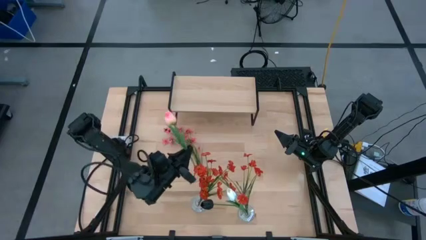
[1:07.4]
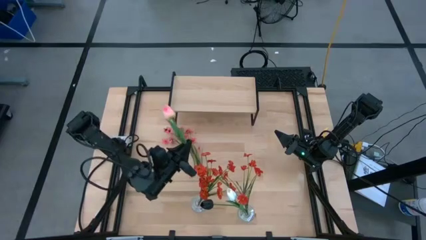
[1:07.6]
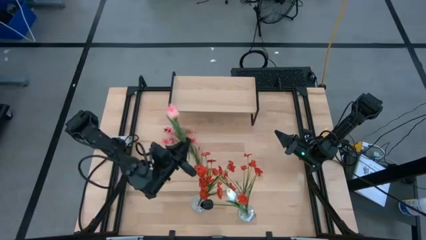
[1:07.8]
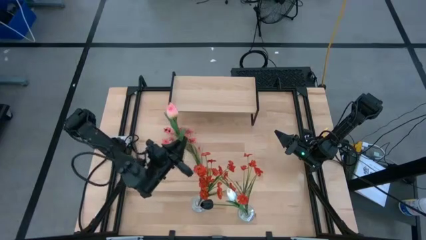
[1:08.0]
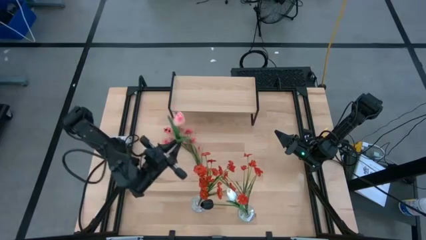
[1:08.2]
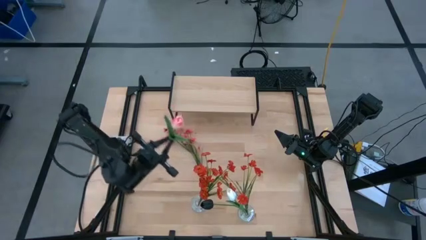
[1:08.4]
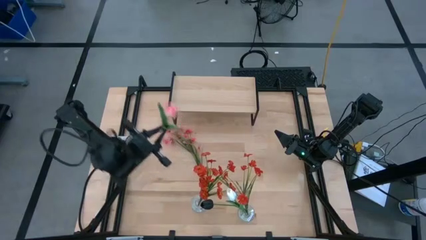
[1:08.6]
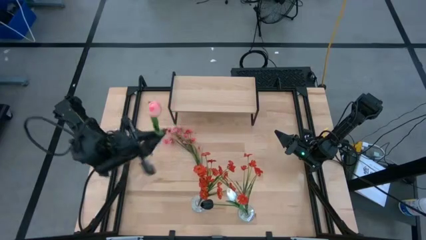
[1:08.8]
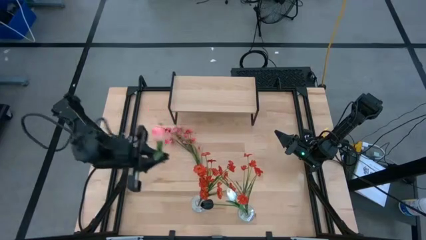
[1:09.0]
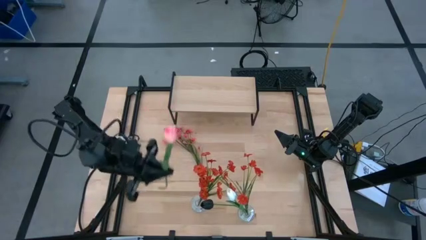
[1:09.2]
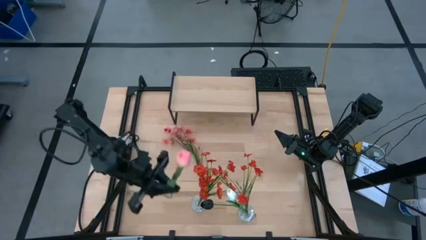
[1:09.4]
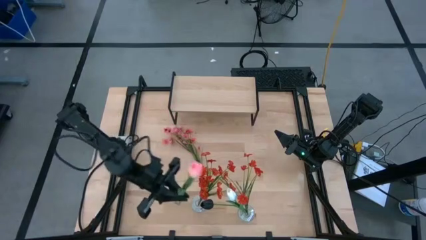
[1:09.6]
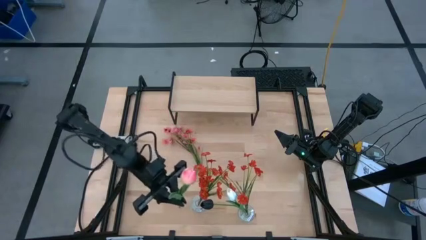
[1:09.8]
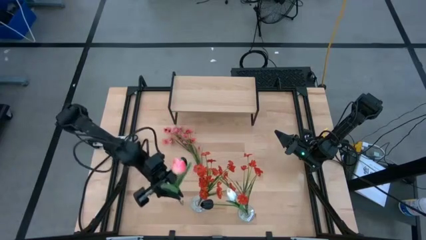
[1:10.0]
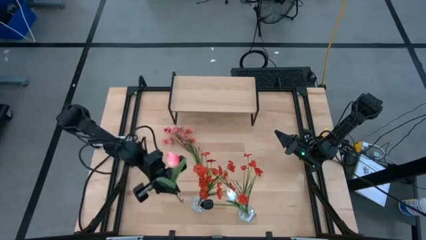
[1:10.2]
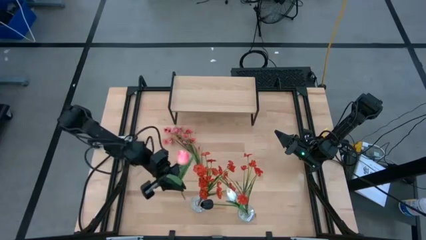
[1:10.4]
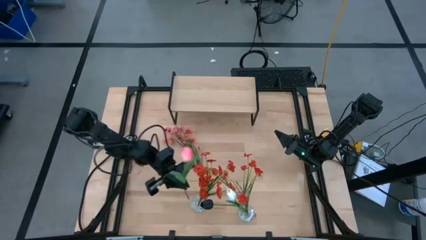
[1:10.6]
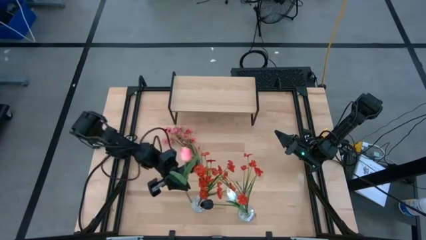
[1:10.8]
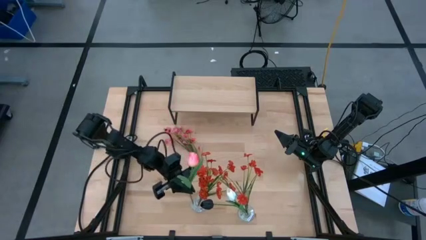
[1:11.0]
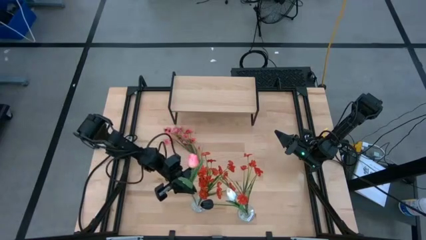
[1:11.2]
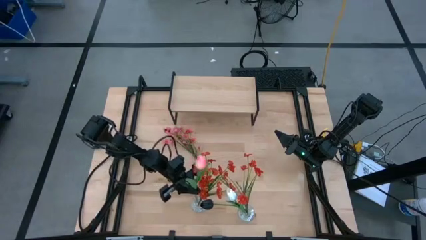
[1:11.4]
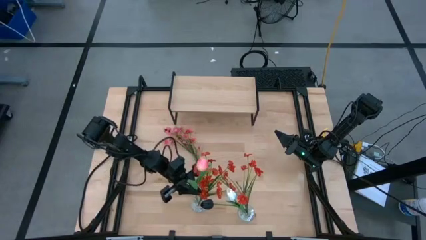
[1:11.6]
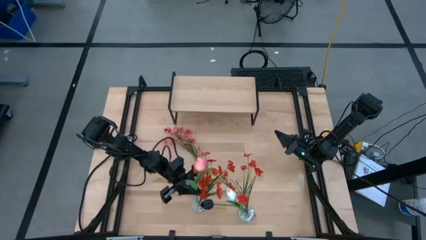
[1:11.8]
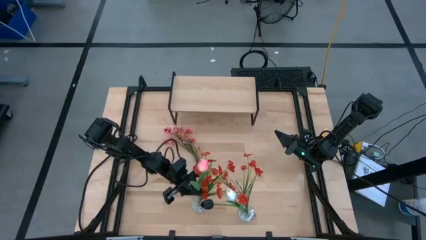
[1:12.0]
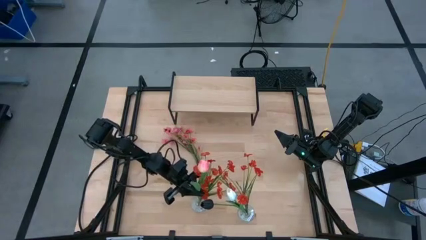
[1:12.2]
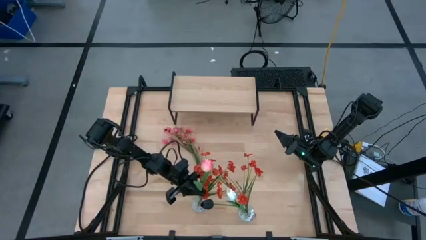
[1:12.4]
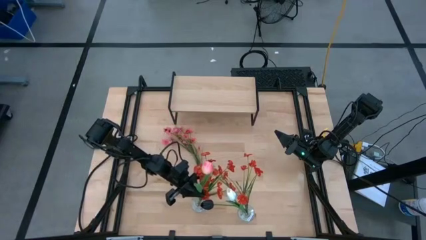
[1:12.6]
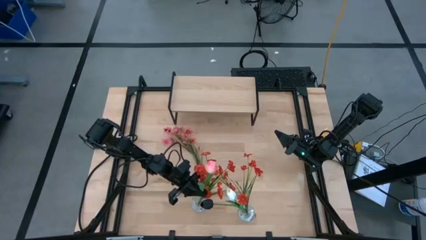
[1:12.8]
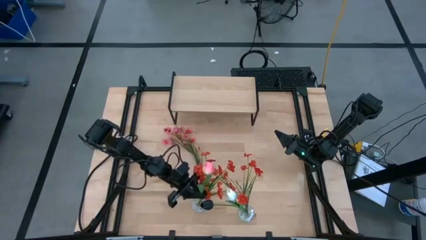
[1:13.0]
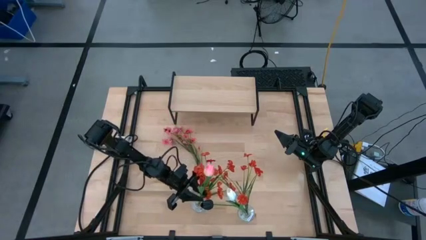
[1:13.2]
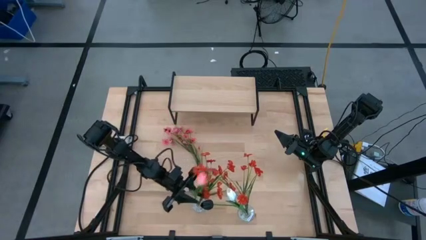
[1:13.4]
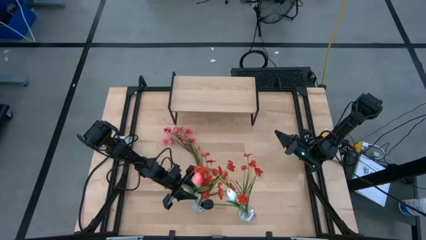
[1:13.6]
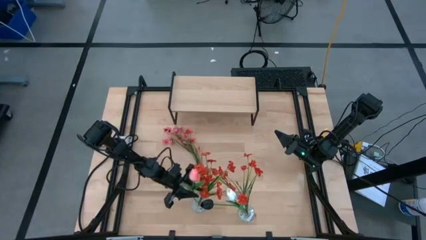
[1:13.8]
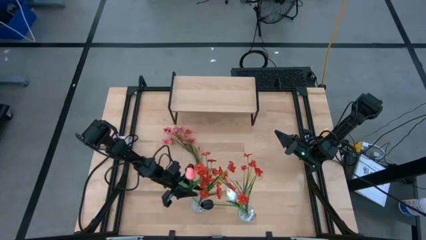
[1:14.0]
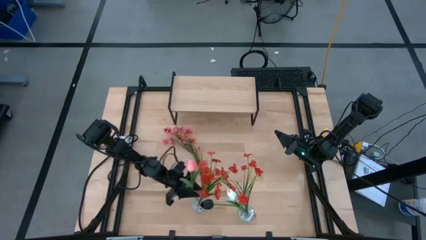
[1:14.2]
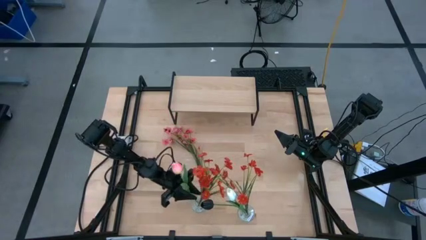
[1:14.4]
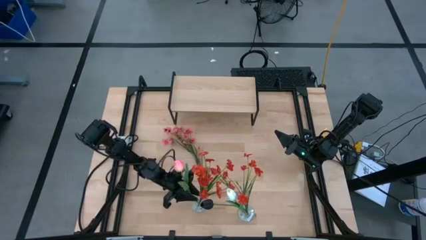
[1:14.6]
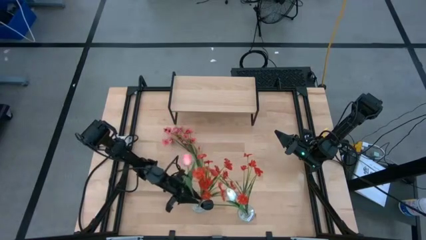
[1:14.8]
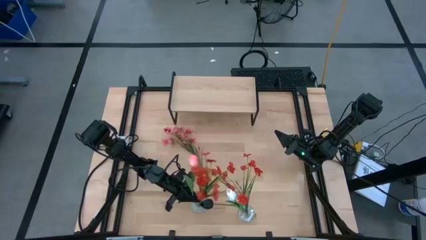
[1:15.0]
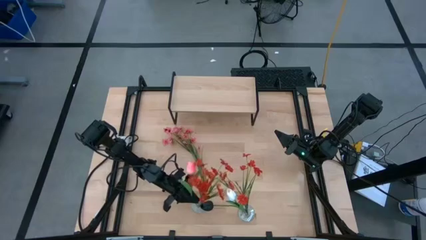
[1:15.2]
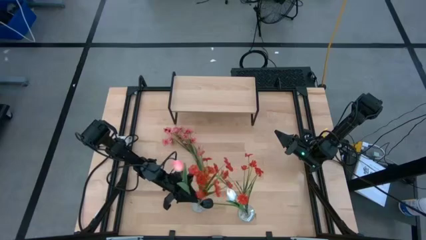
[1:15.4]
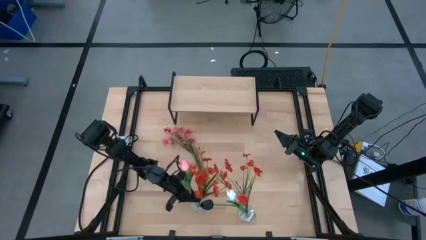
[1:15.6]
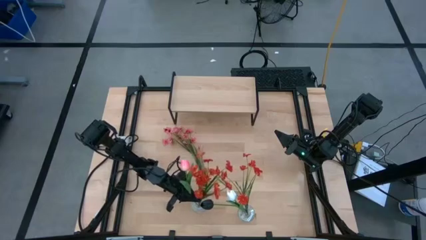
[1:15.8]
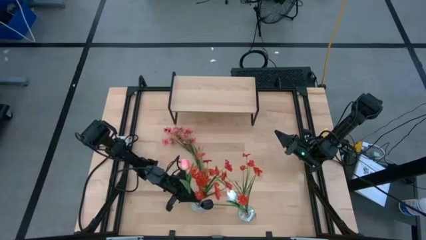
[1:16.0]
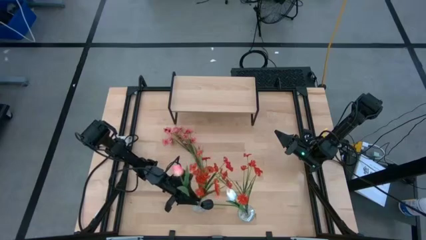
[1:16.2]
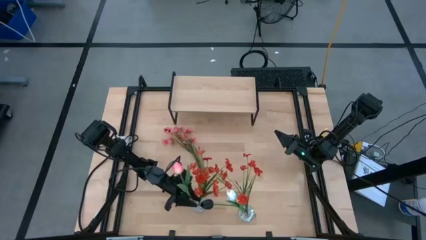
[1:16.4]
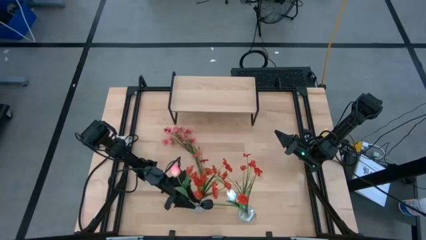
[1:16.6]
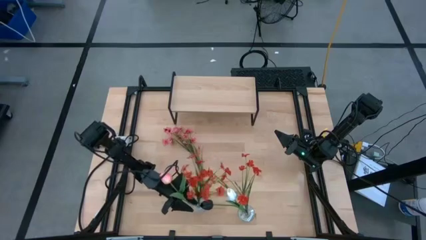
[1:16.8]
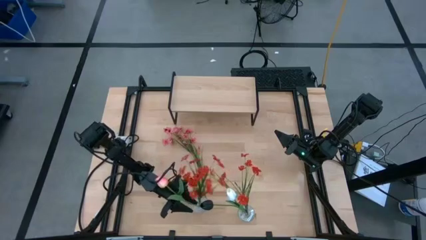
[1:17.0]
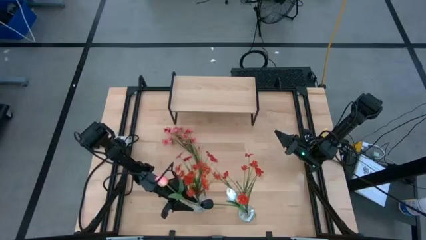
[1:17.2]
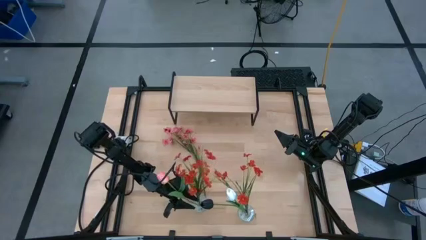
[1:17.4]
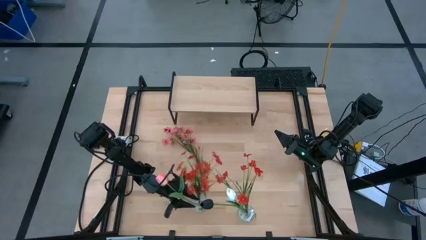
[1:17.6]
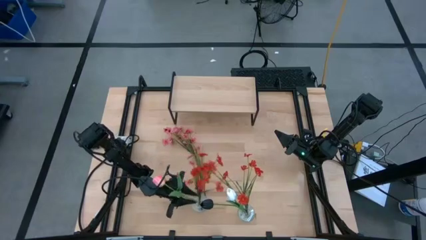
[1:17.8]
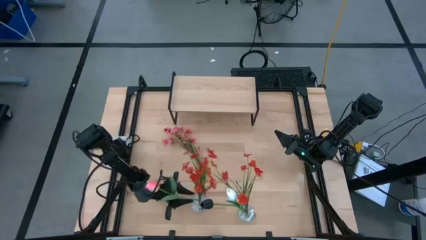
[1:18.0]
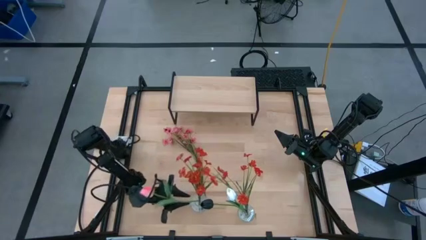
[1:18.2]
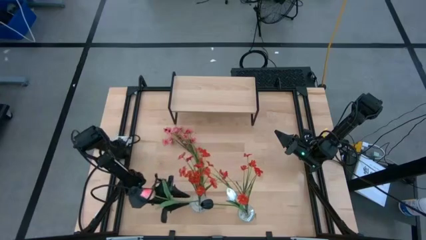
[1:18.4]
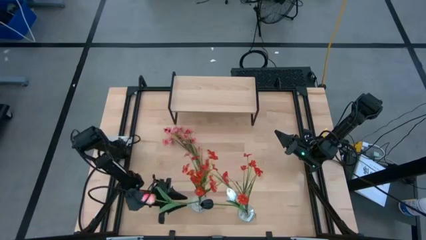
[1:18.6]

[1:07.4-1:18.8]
Task: Pick and place flowers into a vace then onto a shelf
Put the light pink flower into the left transparent vase

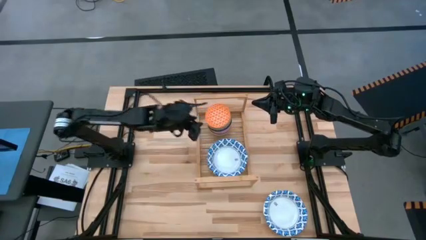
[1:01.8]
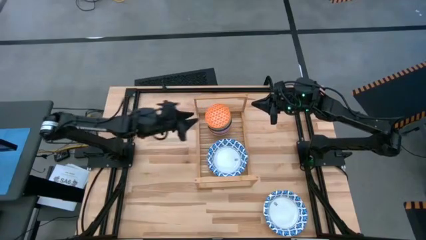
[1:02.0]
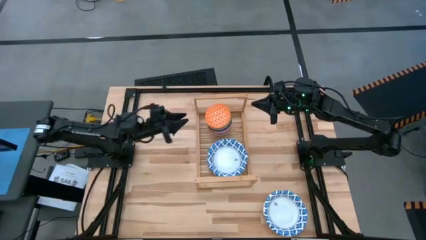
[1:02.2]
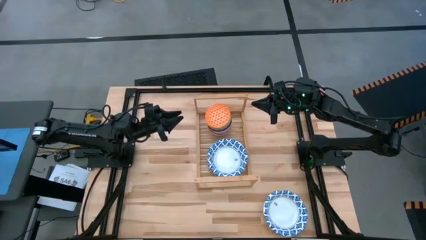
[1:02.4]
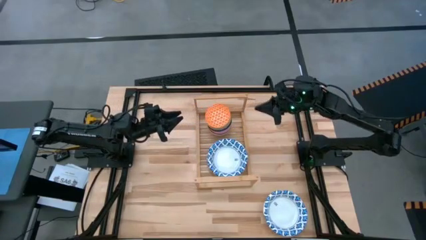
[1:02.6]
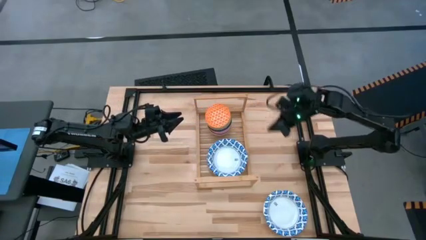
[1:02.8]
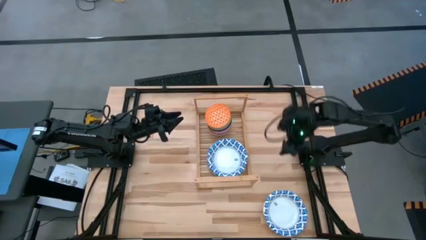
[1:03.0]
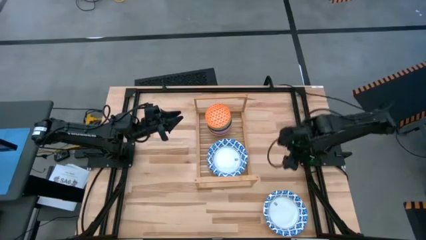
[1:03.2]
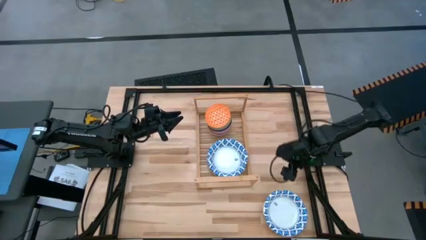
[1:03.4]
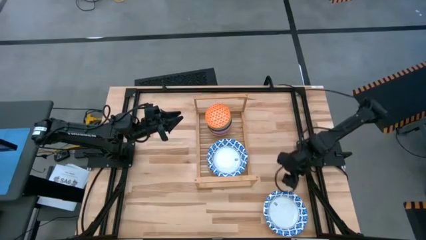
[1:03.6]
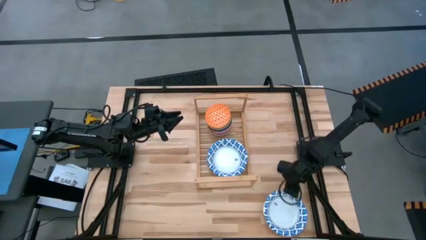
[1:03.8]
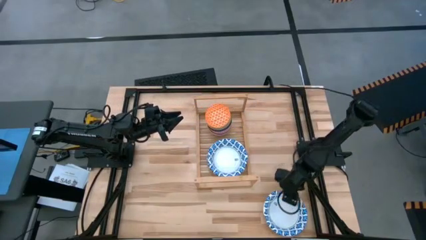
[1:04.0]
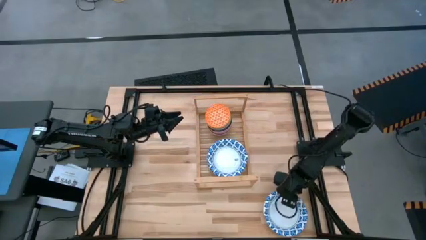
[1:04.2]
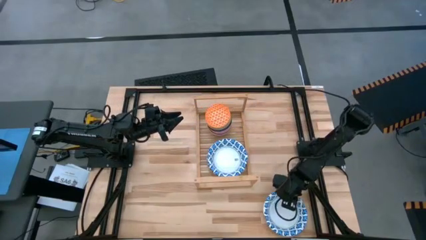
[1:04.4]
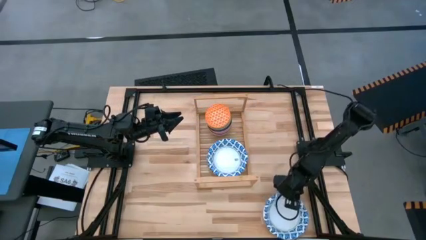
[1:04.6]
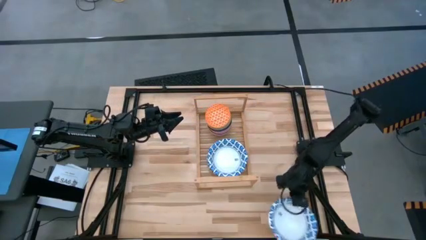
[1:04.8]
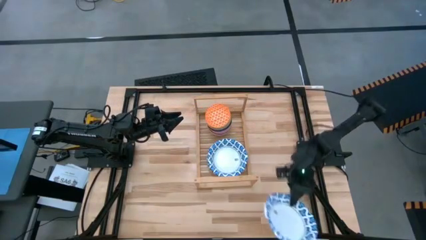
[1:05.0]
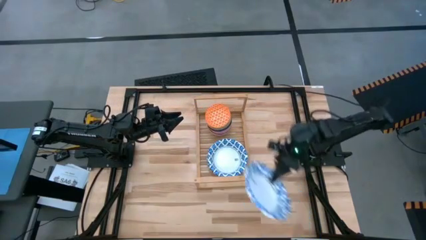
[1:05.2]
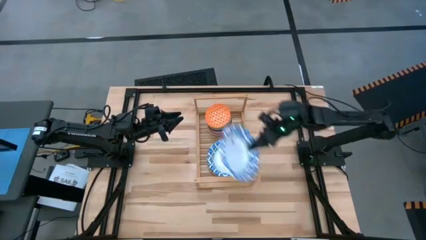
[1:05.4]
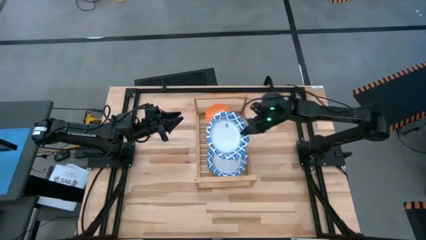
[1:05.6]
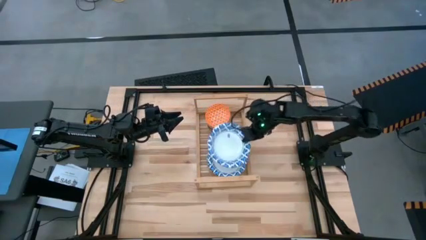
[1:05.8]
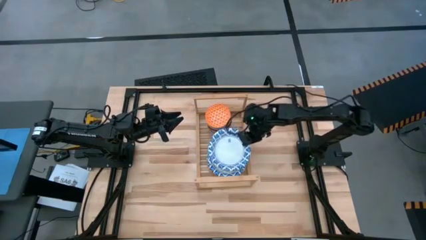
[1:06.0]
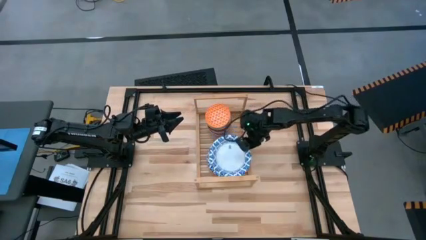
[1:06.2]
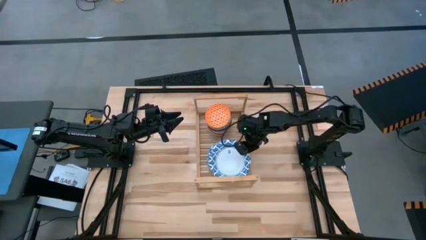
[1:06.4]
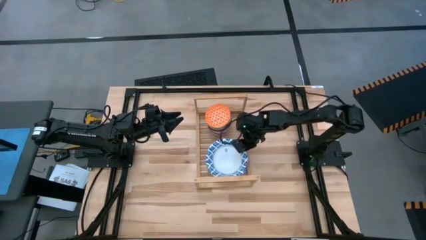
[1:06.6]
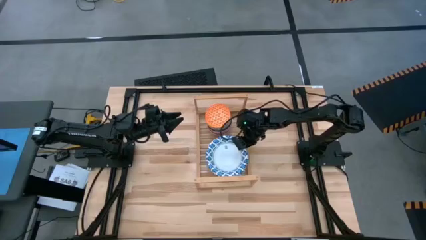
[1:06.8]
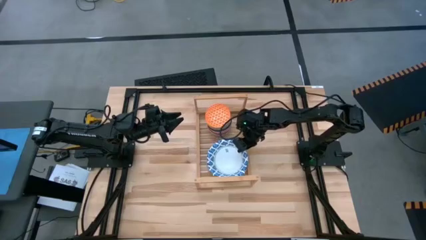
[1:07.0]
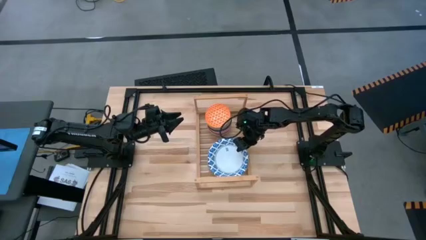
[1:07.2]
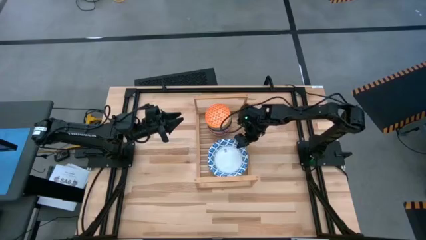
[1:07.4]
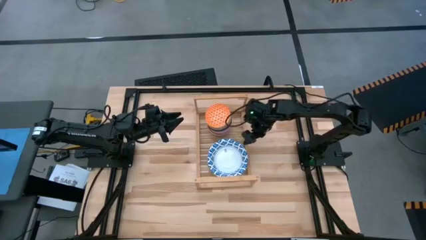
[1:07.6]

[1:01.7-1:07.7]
Task: Place and stack bowls onto a shelf
Stack the blue white bowl on top of the blue white bowl on the shelf
